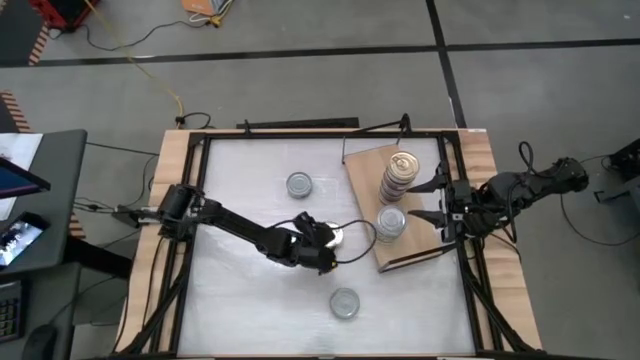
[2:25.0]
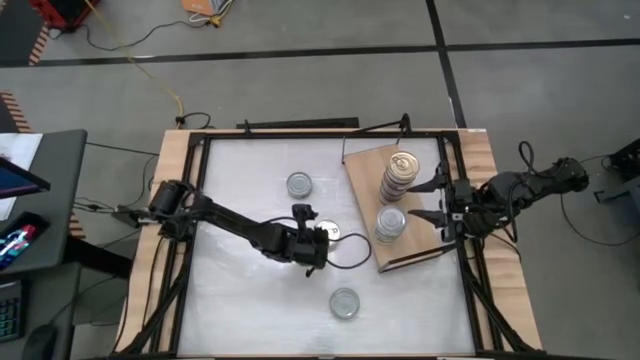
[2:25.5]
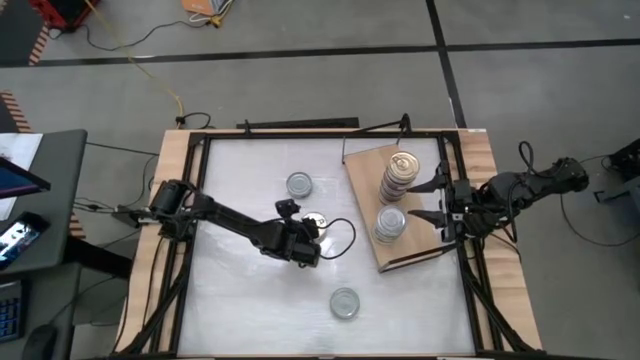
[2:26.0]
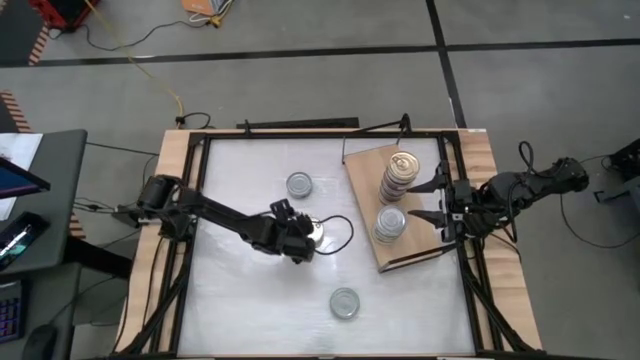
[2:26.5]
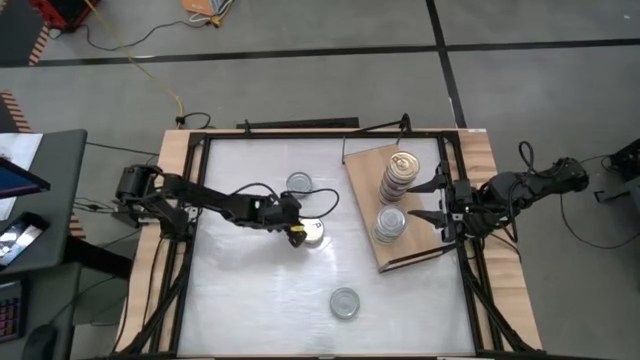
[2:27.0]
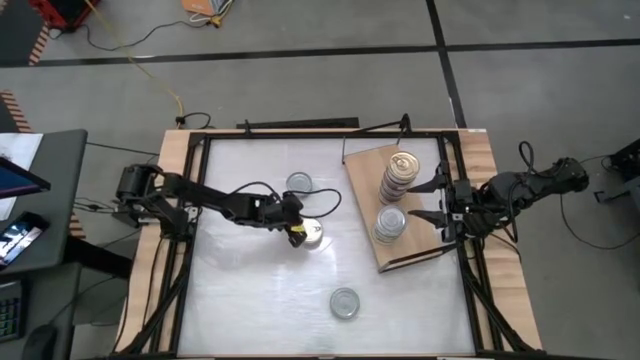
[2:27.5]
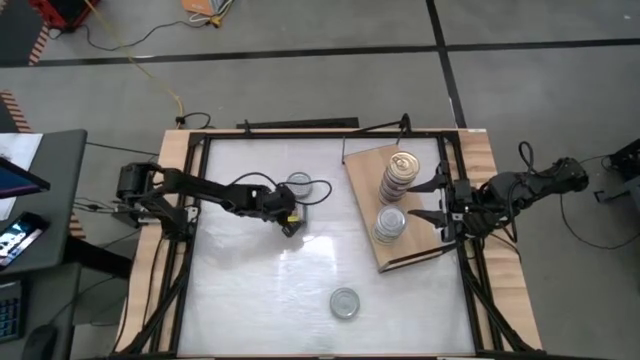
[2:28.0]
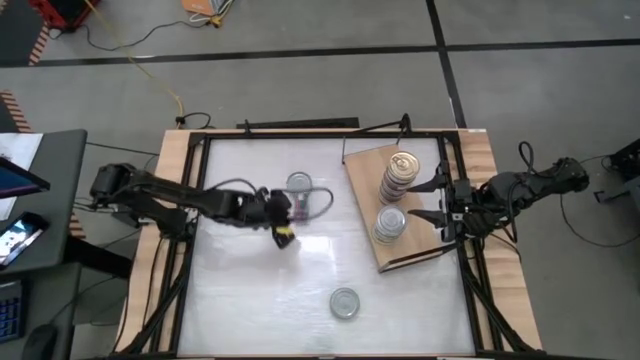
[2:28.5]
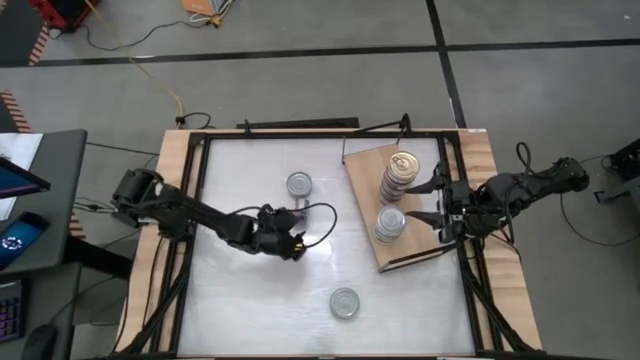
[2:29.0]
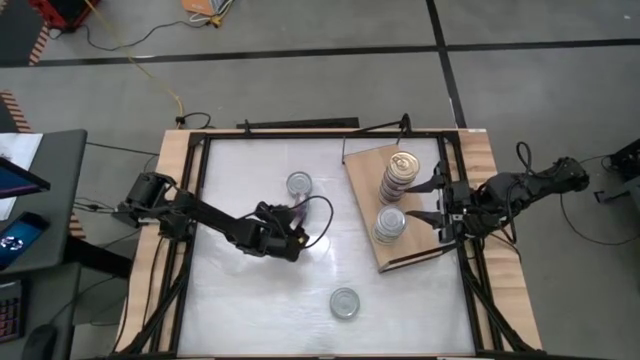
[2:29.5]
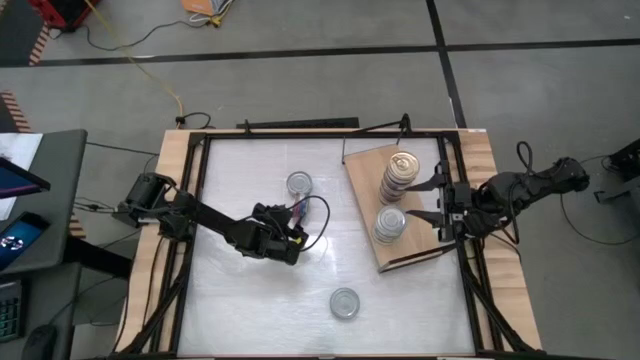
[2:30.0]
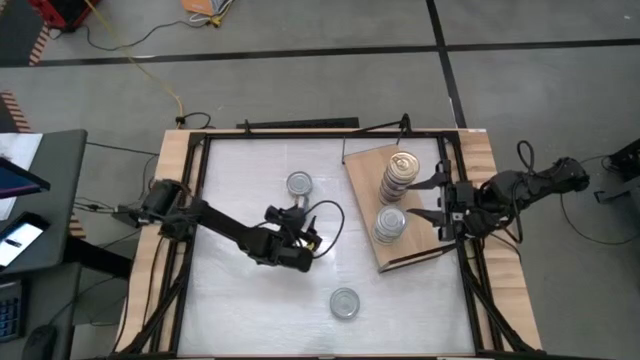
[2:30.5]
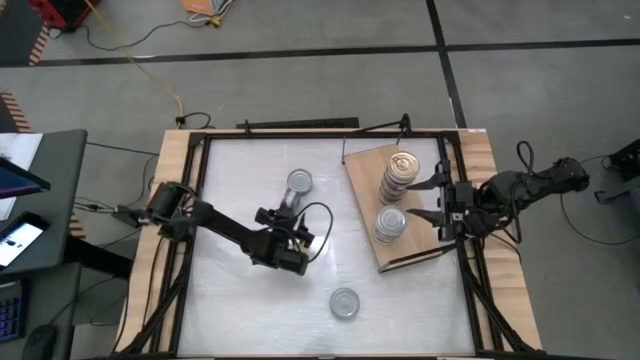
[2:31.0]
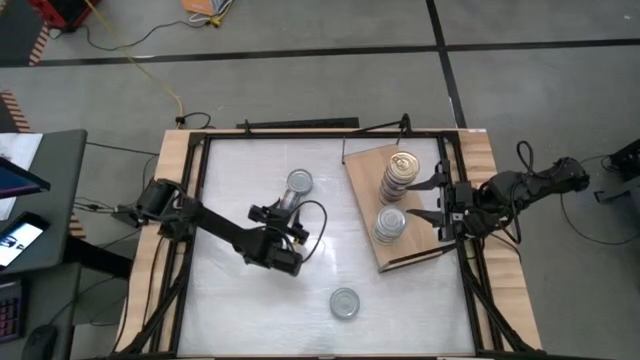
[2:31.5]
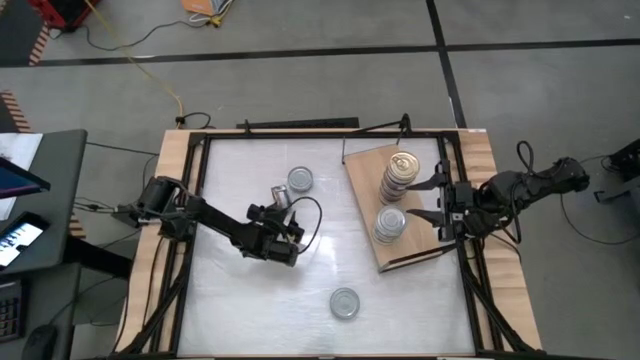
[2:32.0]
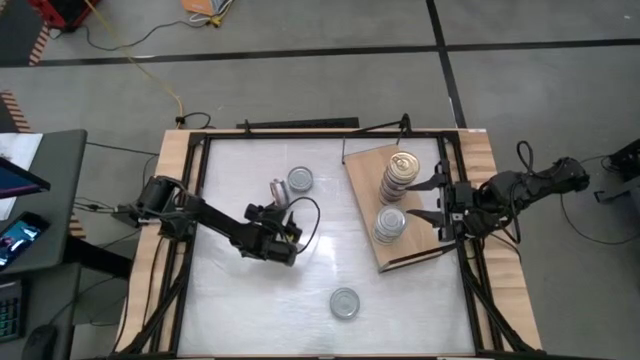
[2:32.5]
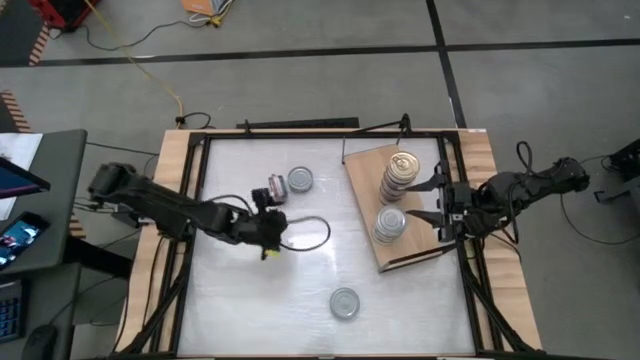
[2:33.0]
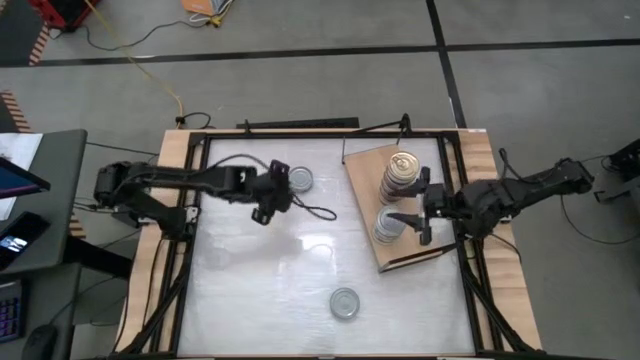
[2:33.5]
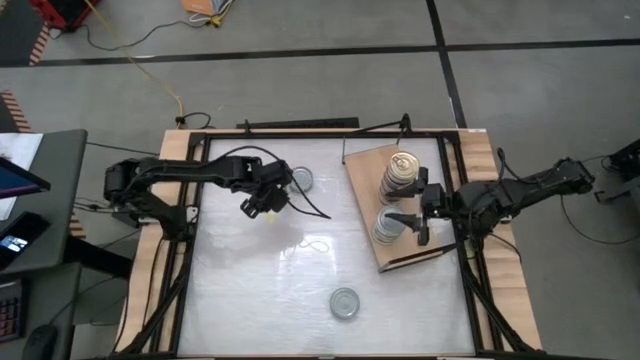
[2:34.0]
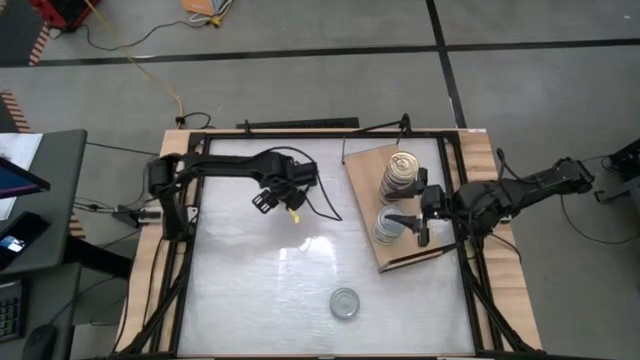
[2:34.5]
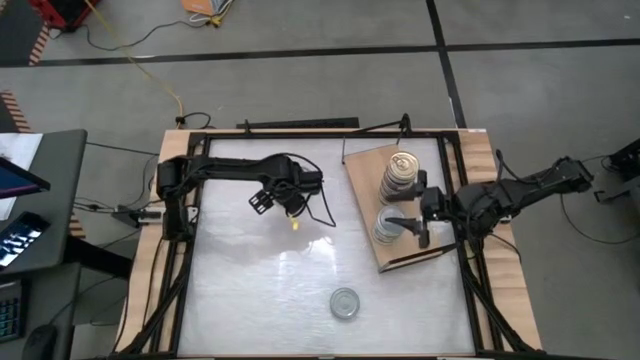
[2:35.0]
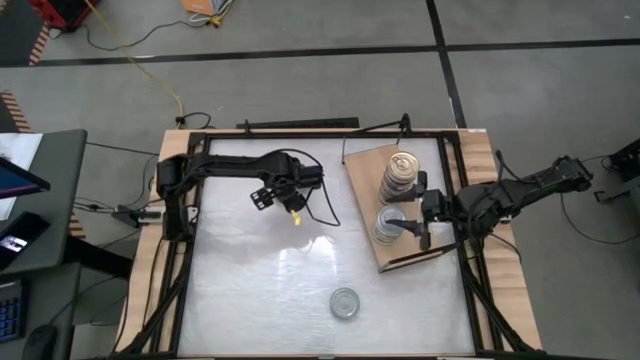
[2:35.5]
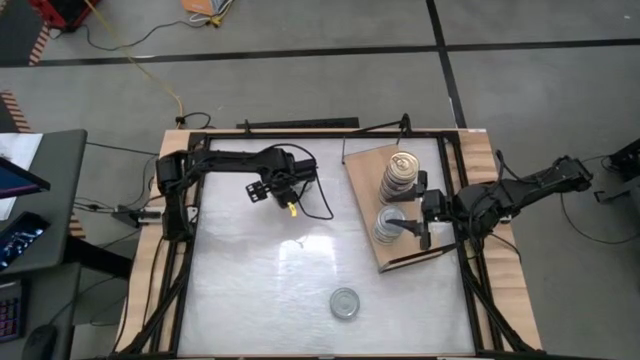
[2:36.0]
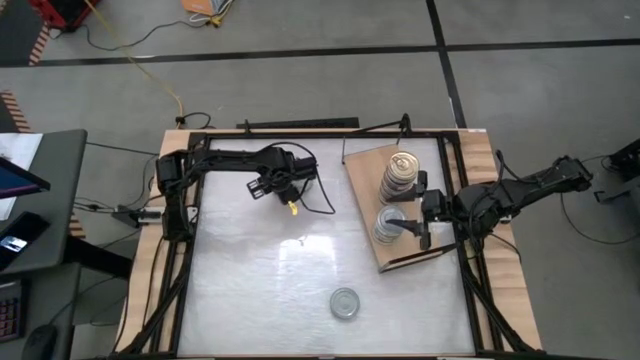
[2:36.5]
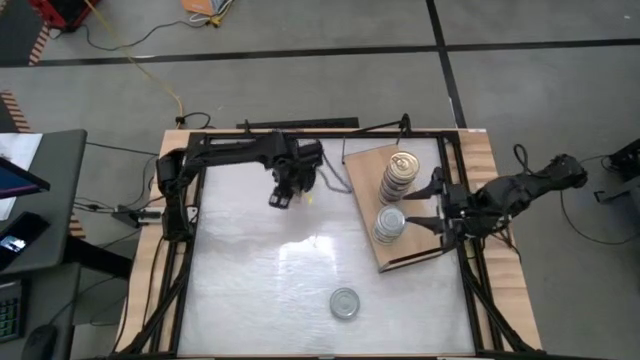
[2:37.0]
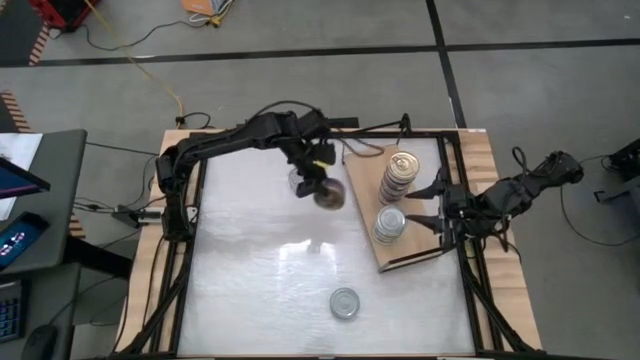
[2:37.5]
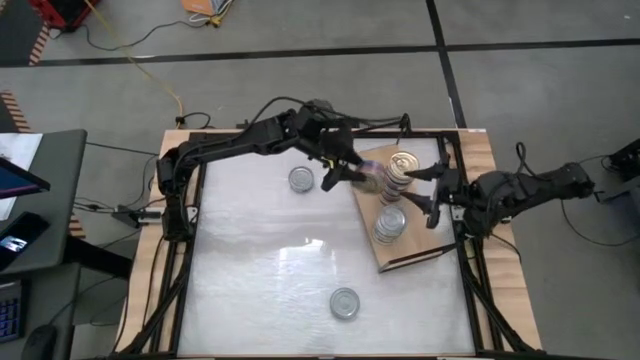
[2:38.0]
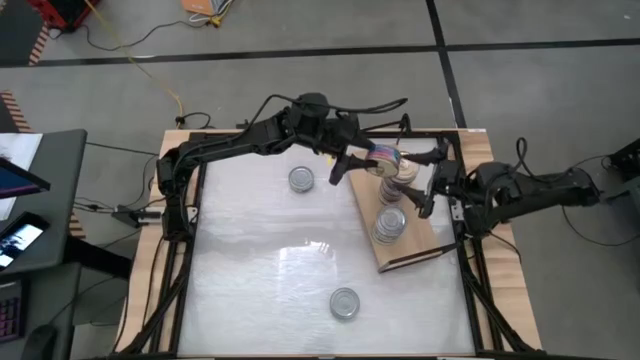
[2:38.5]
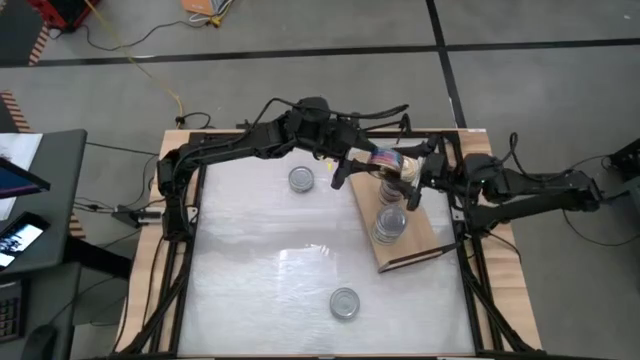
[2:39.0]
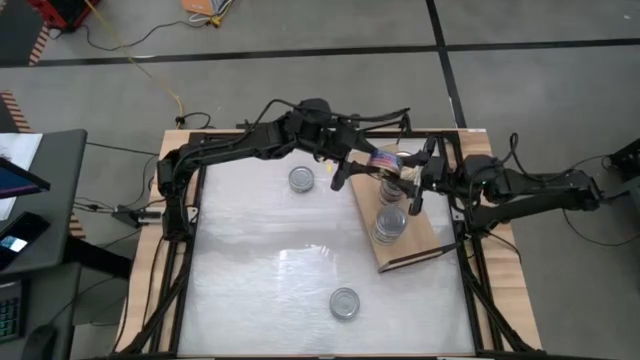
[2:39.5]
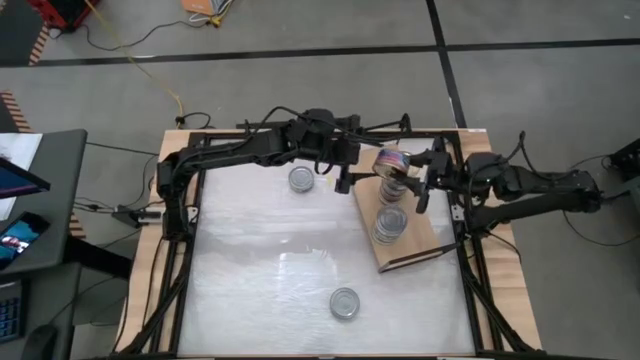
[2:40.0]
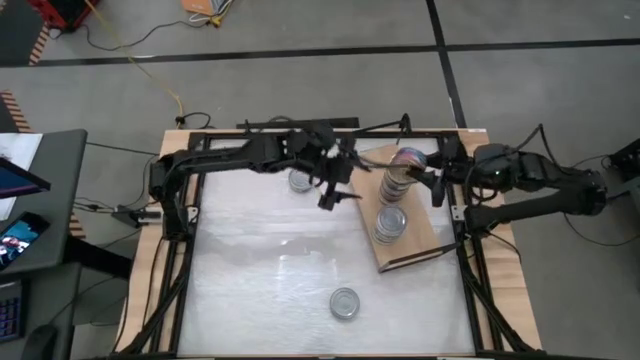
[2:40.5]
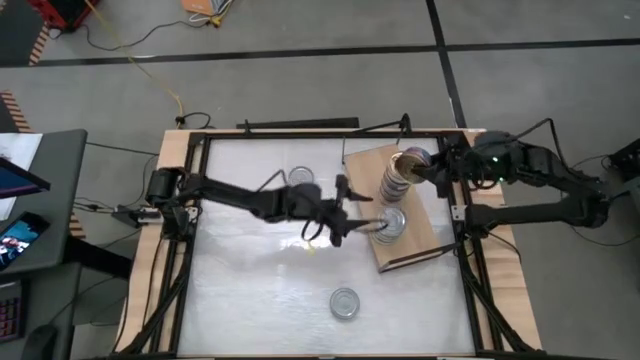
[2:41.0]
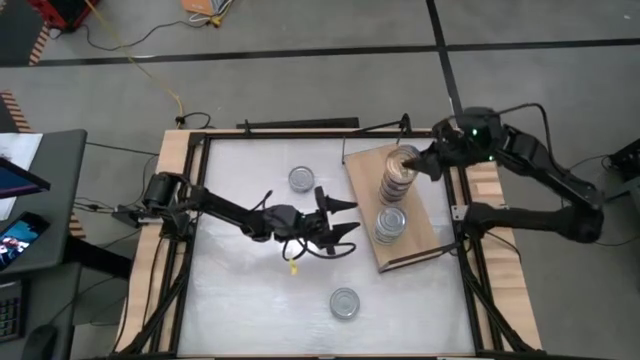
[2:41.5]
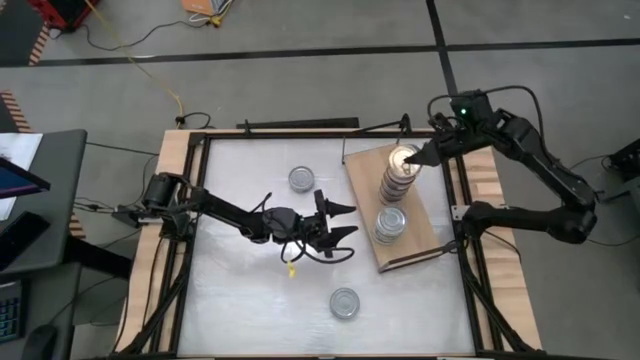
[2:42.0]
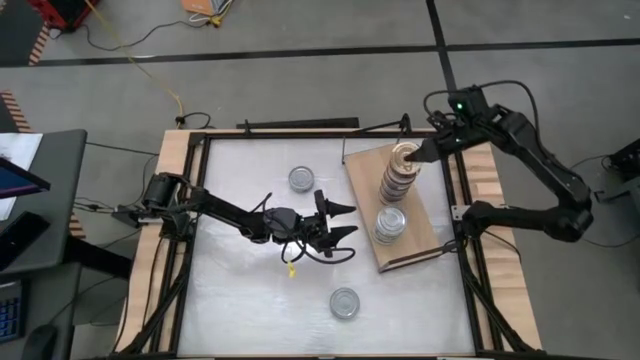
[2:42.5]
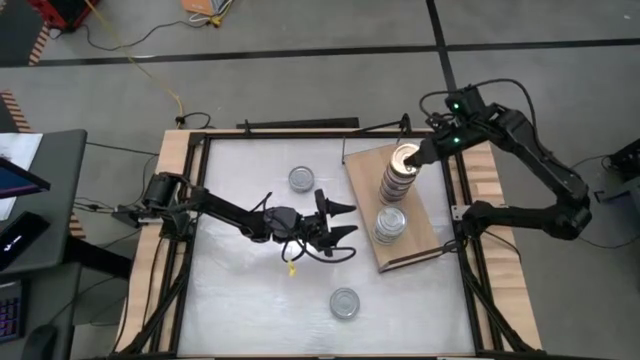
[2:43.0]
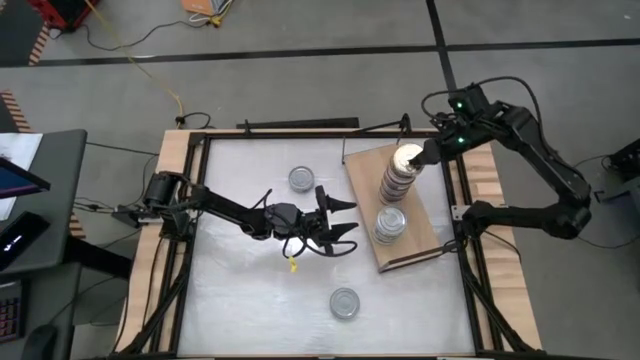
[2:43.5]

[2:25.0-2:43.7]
Task: Stack canned seafood by type on shelf
Stack the blue tuna can on top of the other blue tuna can on the shelf

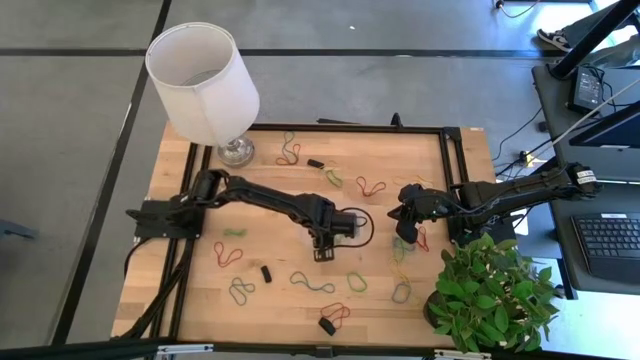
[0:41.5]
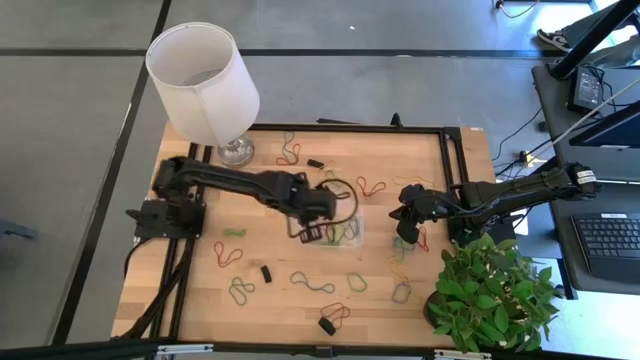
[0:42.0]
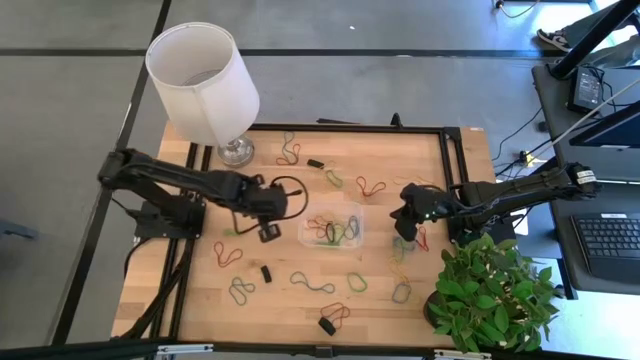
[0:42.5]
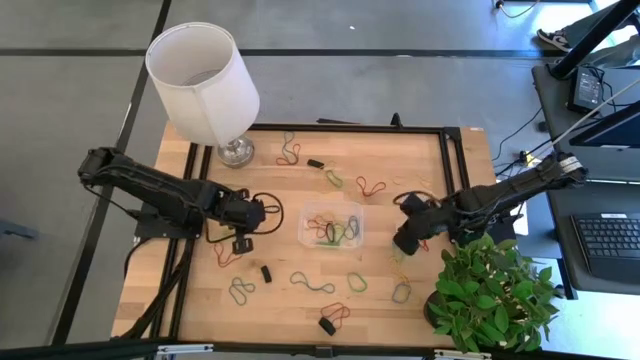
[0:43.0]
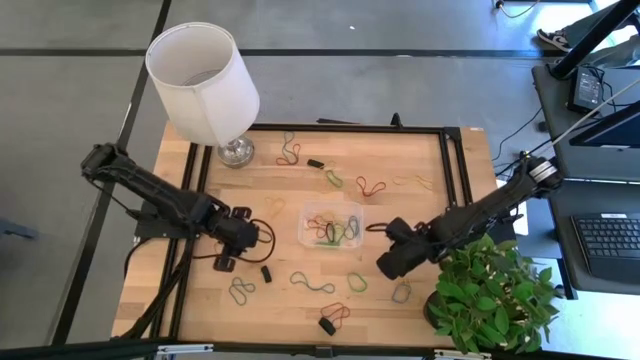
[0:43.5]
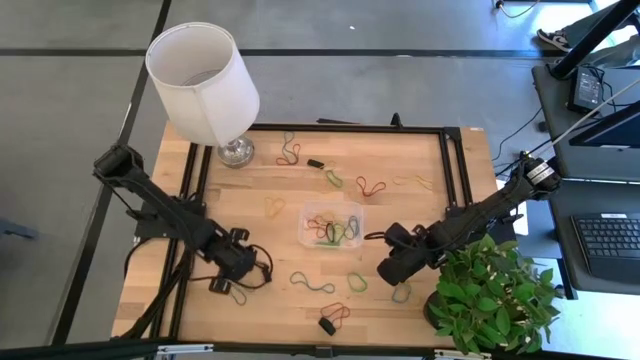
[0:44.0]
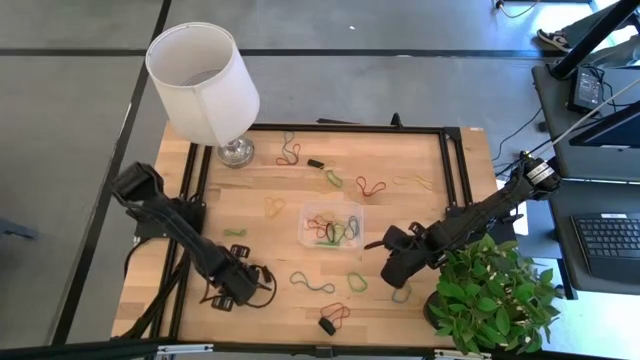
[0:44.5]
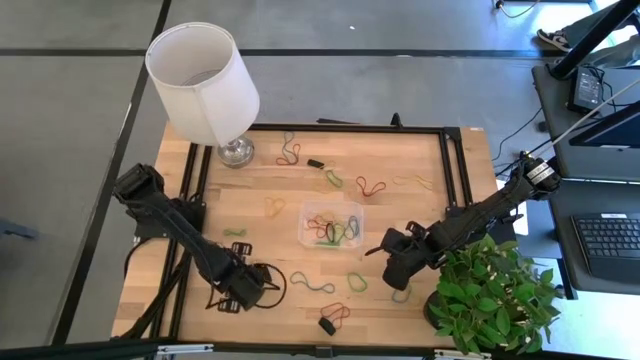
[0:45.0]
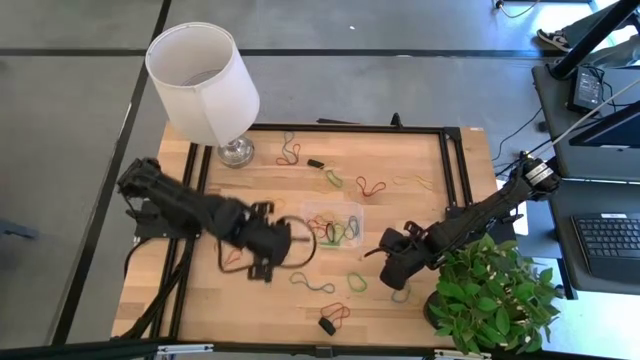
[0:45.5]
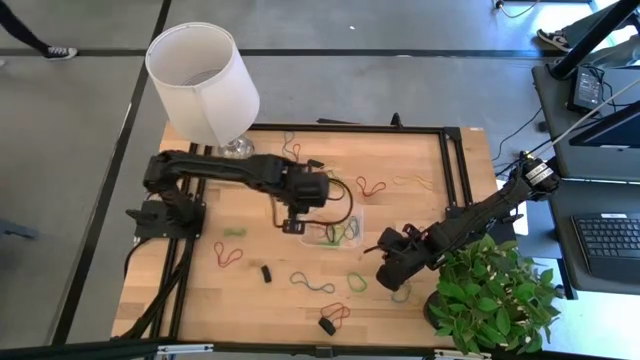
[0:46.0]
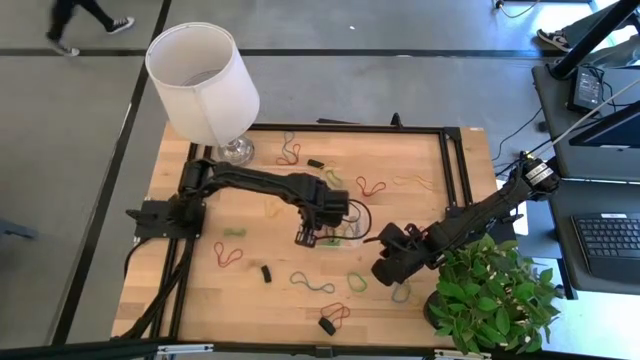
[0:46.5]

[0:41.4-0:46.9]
Task: Pick and place rubber bands into bin
Put the blue rubber band into the transparent bin
